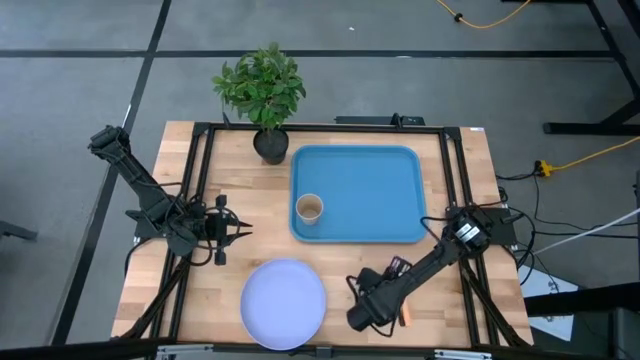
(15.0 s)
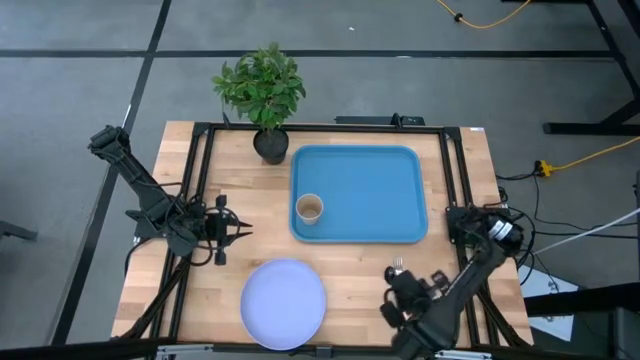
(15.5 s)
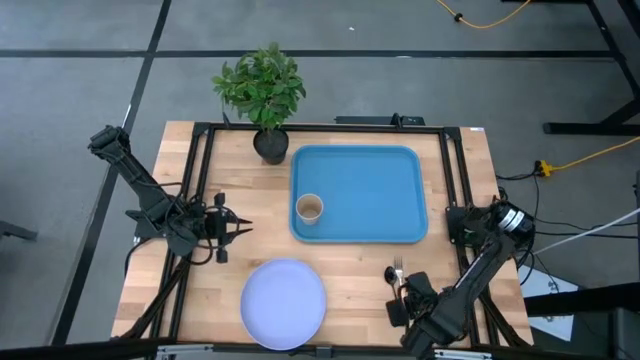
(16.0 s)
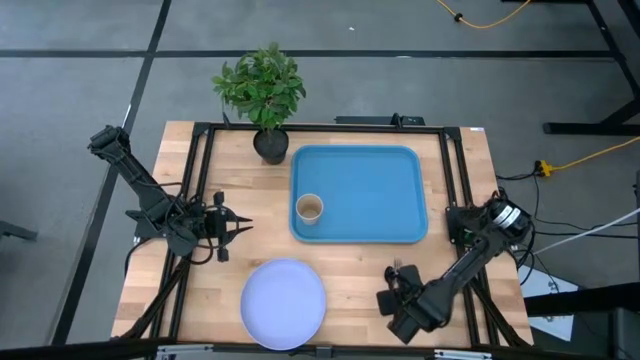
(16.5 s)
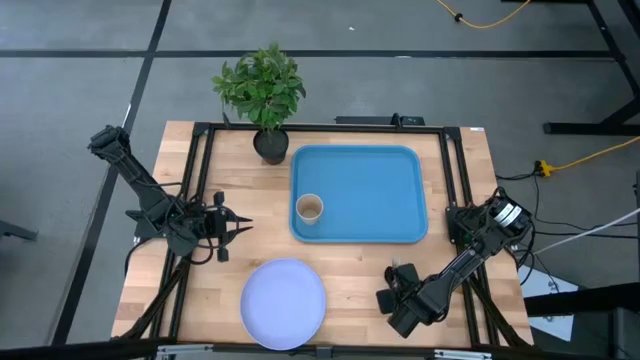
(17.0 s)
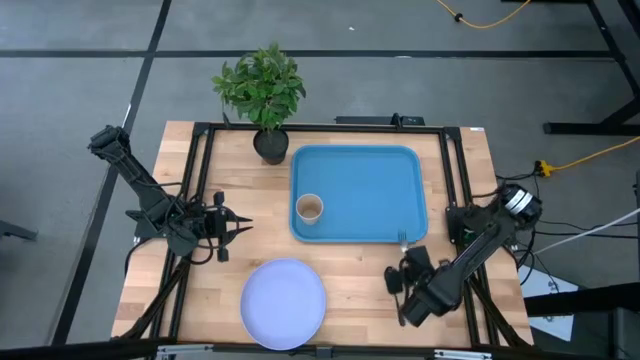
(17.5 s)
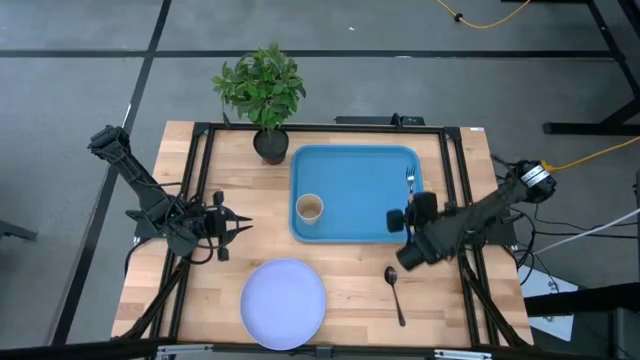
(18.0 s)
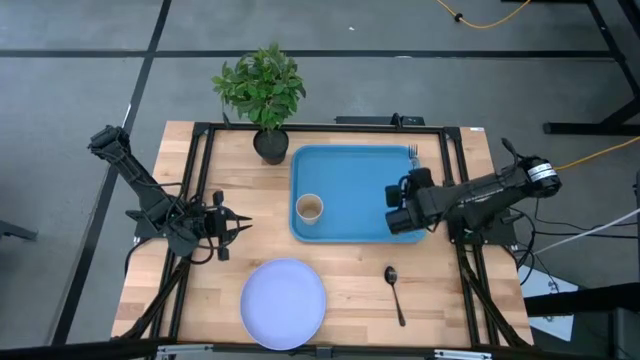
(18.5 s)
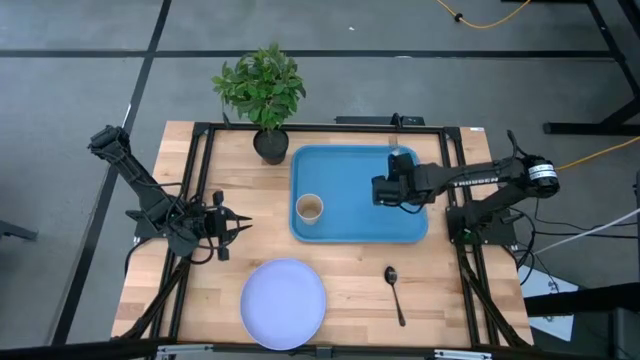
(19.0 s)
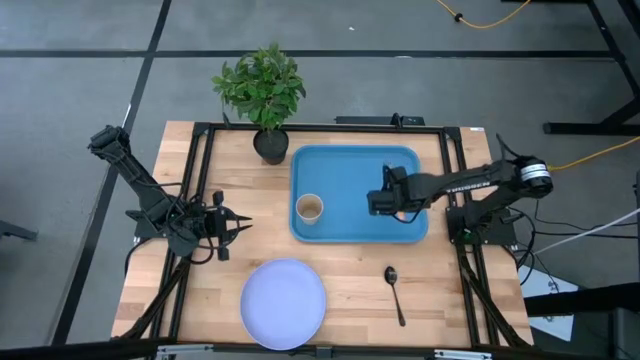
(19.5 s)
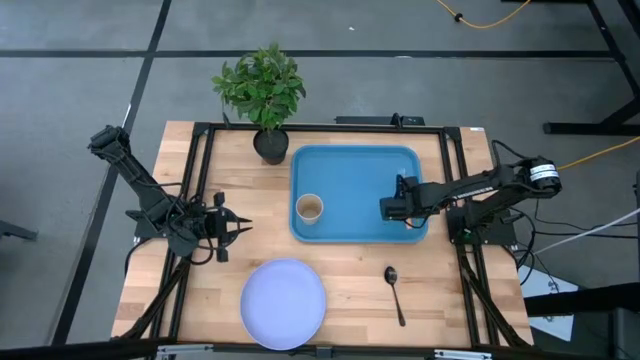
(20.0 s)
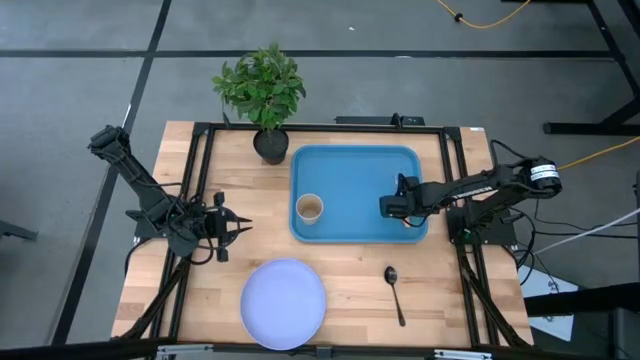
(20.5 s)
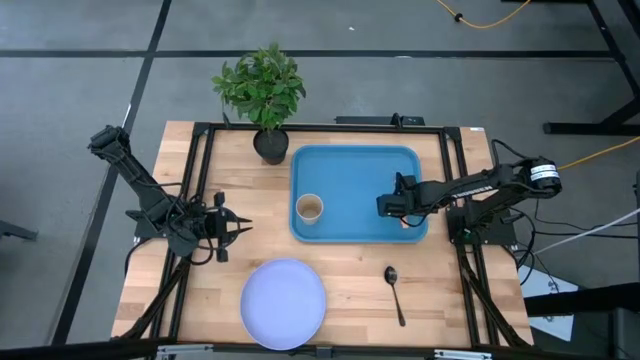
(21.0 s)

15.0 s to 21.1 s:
Task: Pick and place plate/cup/fork/spoon on tray
Put the fork on the right side of the tray

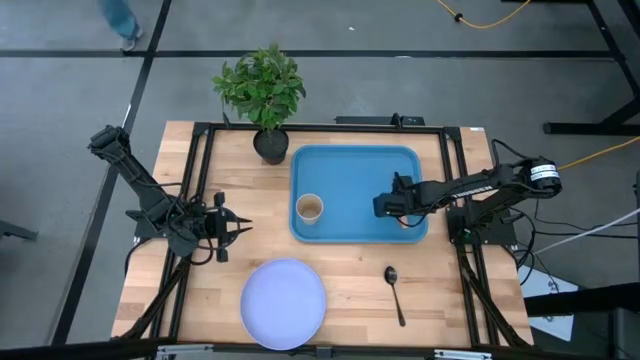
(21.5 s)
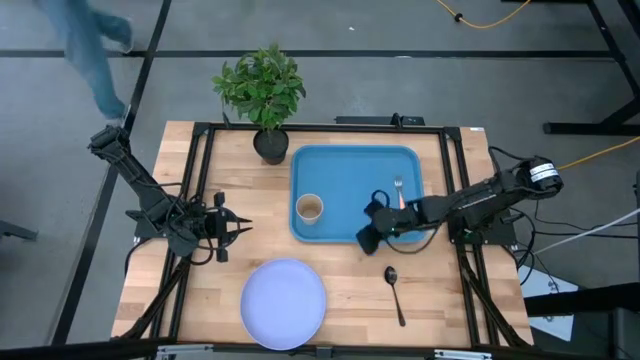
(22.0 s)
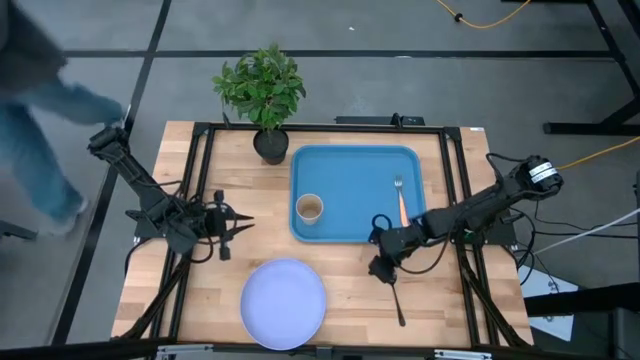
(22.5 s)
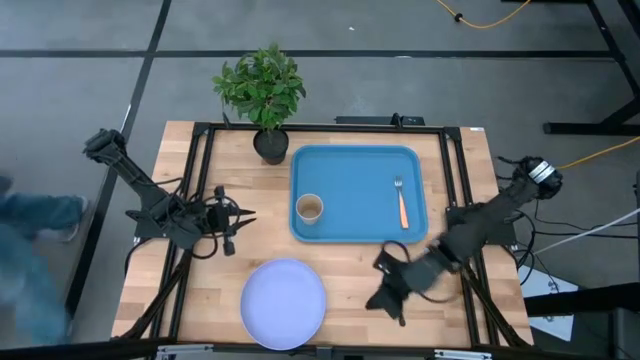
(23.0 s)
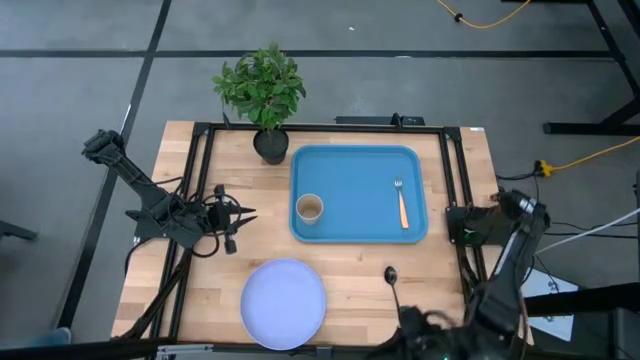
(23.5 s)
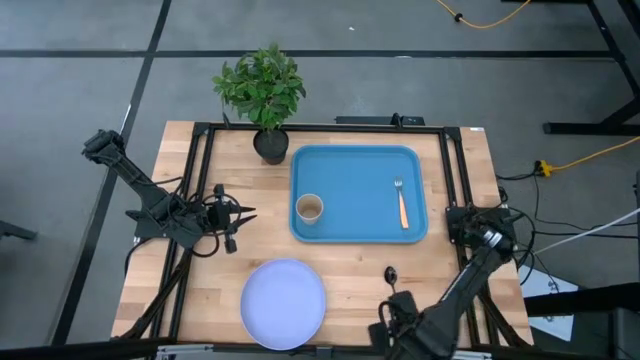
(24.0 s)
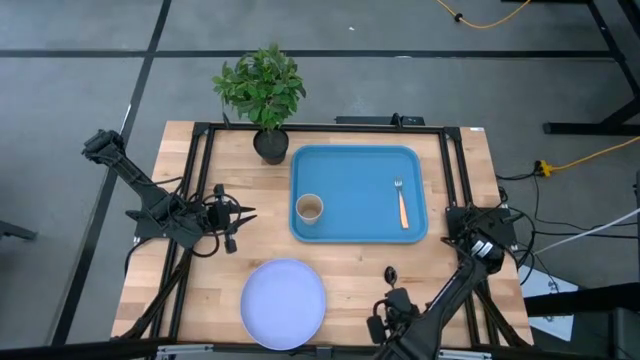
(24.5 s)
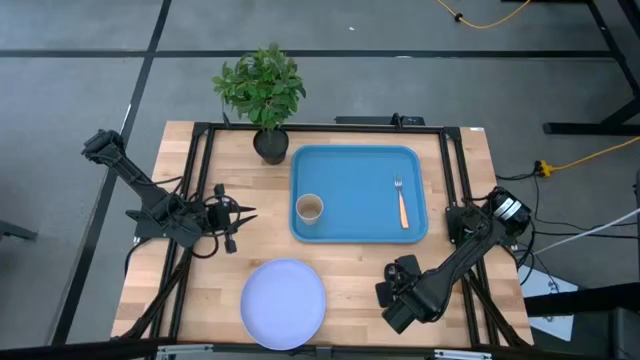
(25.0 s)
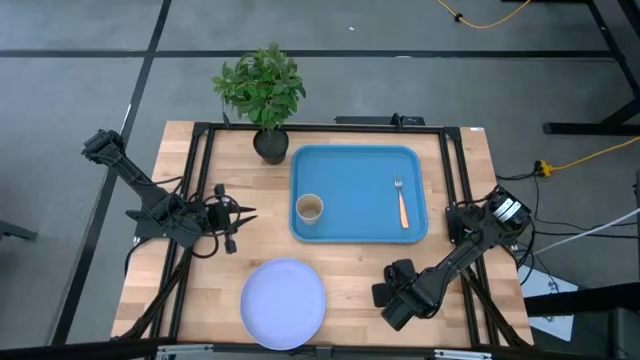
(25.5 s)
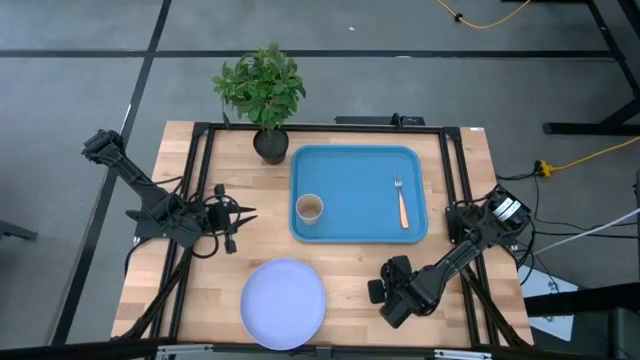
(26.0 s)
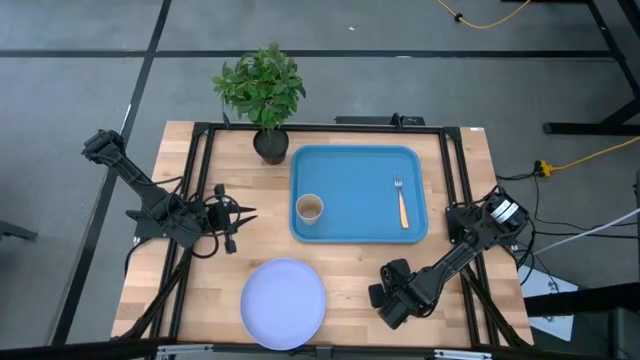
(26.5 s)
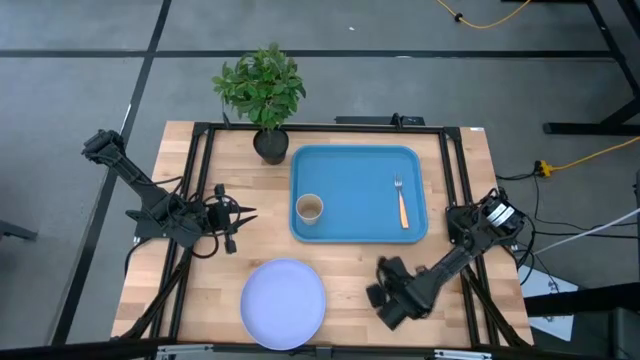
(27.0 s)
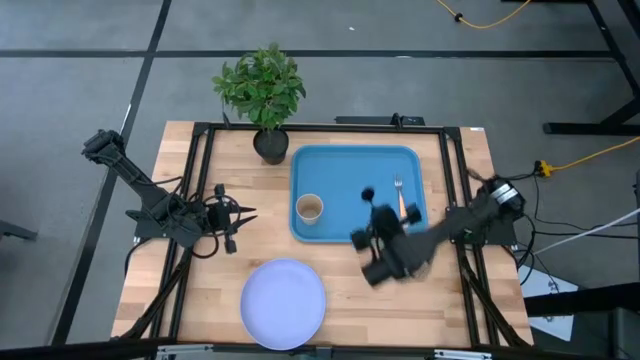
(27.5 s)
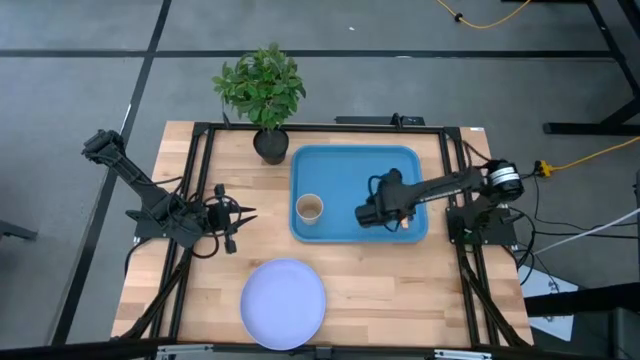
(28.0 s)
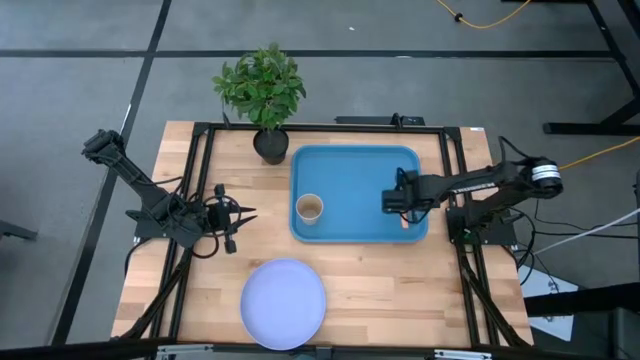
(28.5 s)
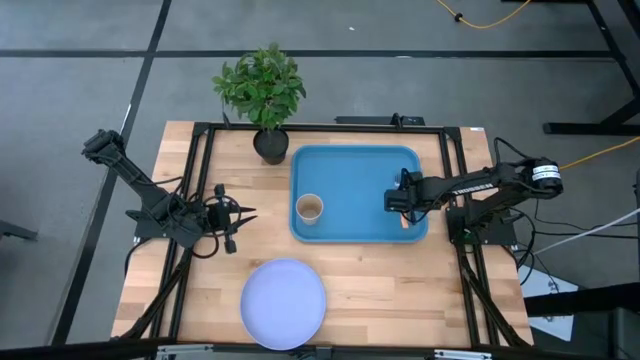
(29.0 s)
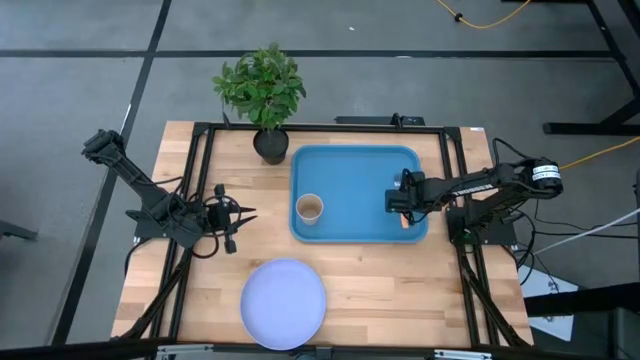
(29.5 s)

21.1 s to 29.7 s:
Put the spoon to the right side of the fork

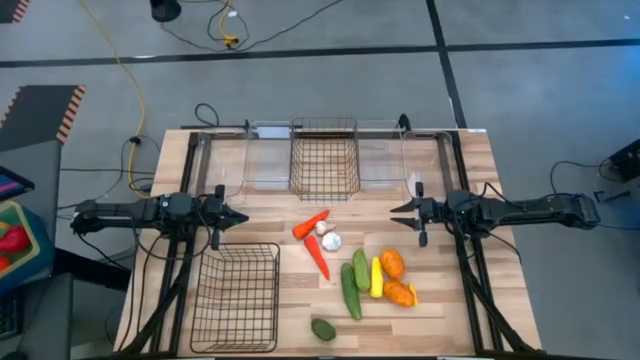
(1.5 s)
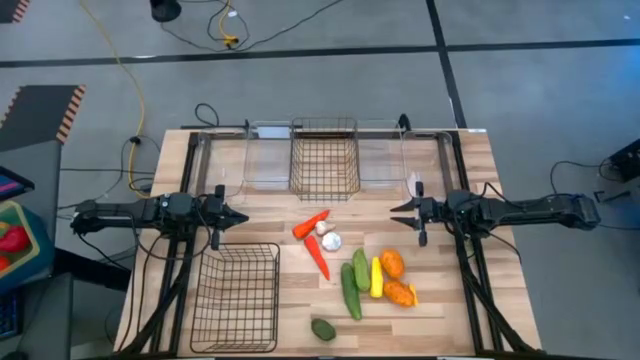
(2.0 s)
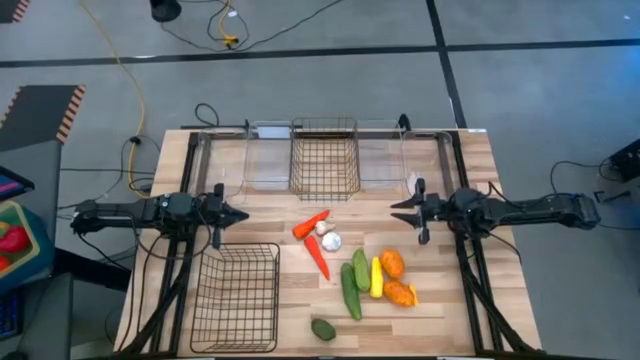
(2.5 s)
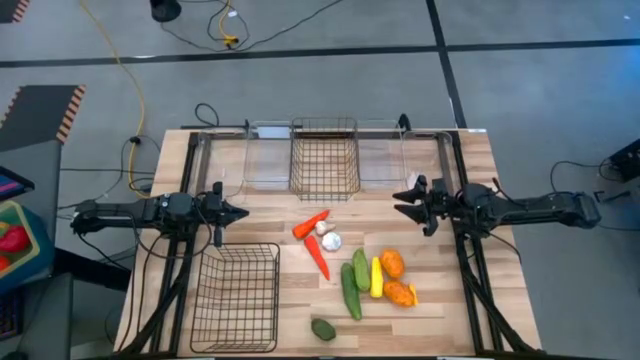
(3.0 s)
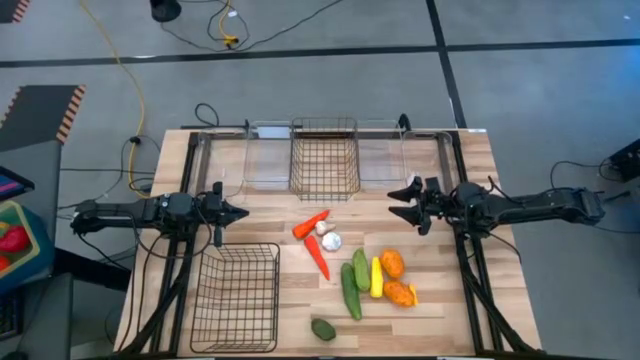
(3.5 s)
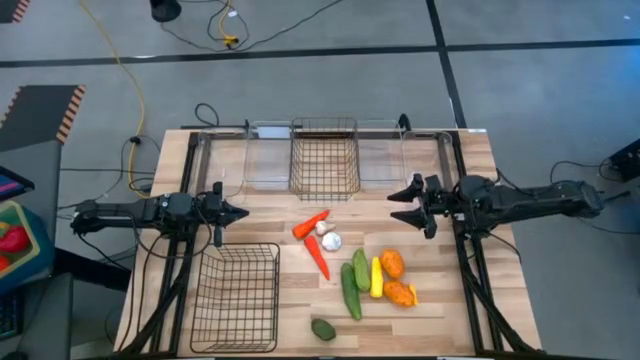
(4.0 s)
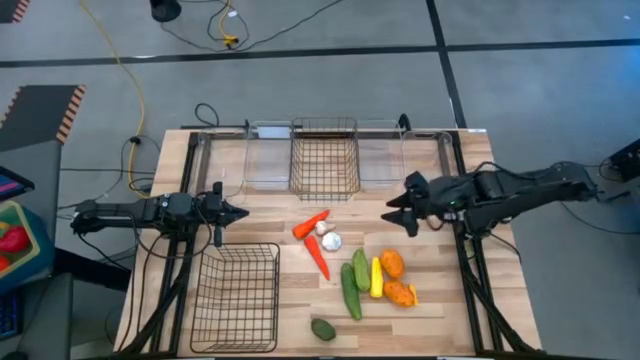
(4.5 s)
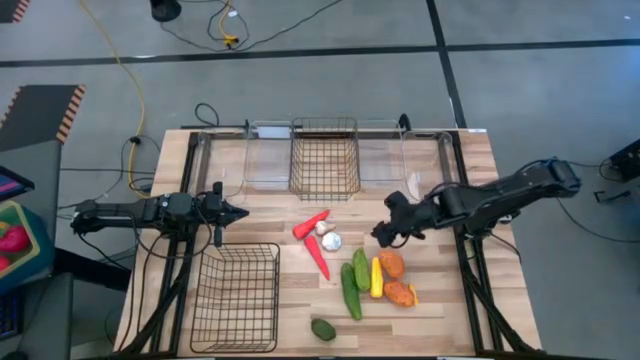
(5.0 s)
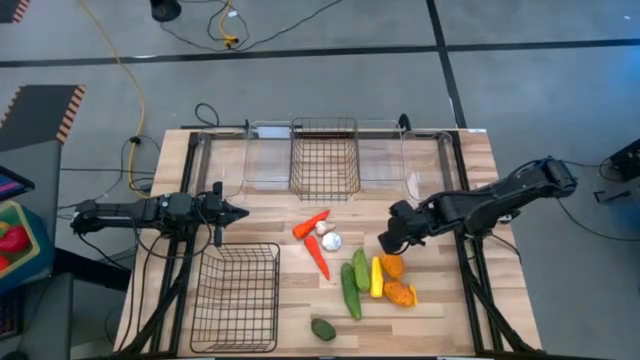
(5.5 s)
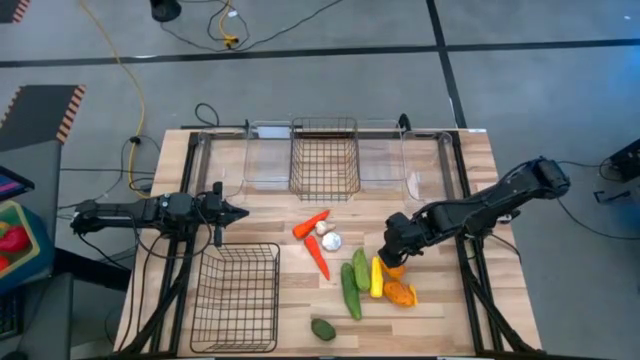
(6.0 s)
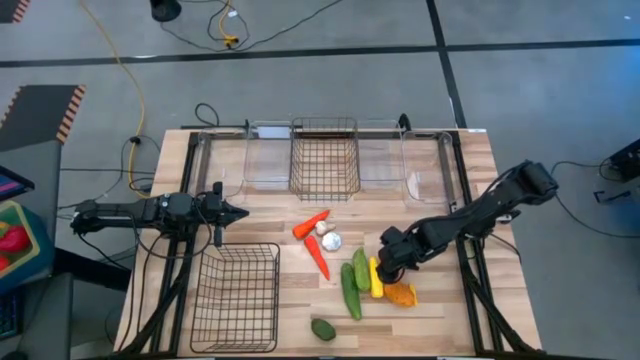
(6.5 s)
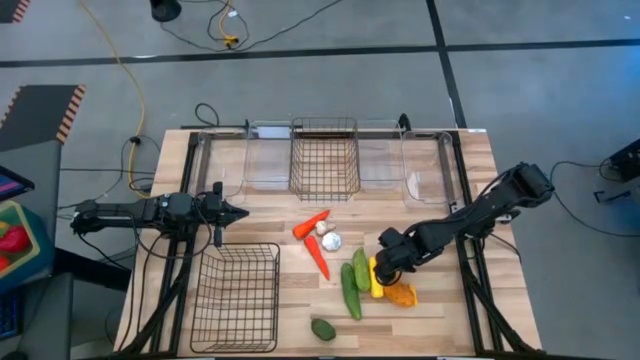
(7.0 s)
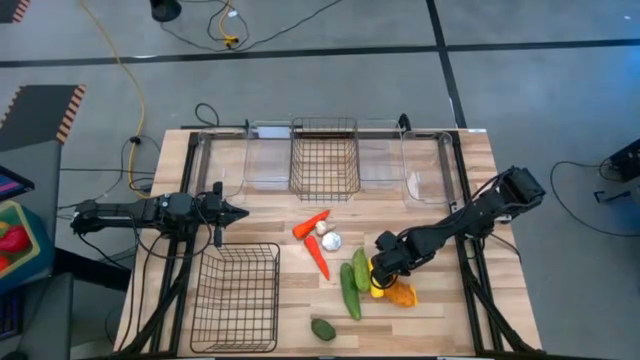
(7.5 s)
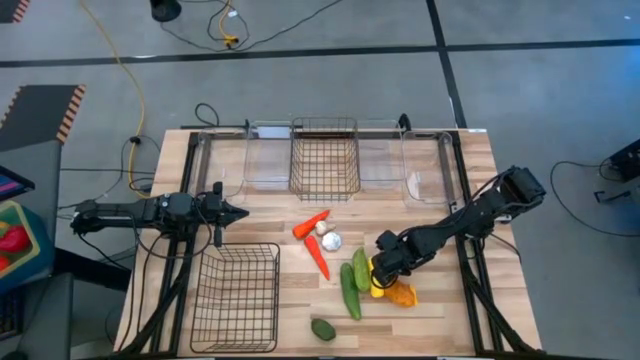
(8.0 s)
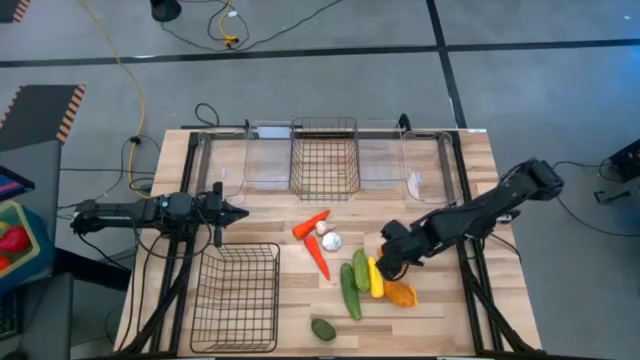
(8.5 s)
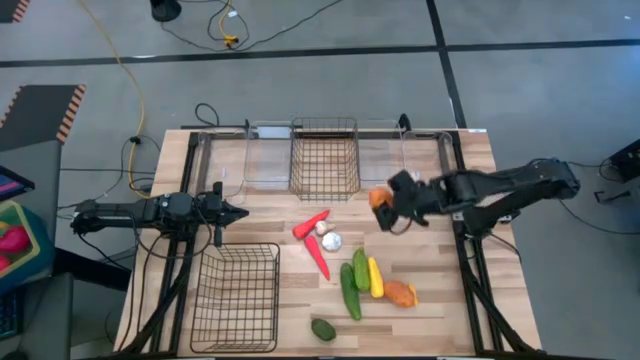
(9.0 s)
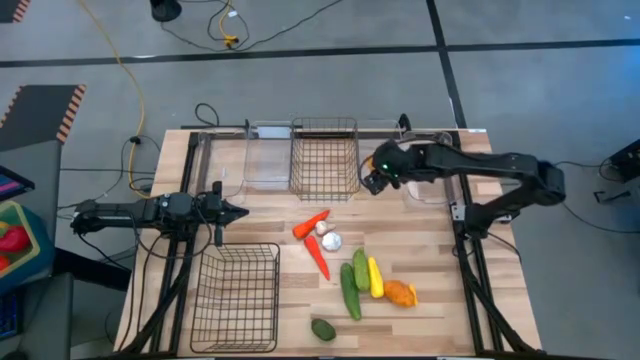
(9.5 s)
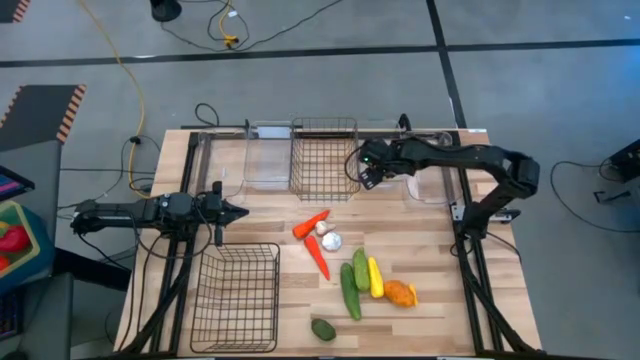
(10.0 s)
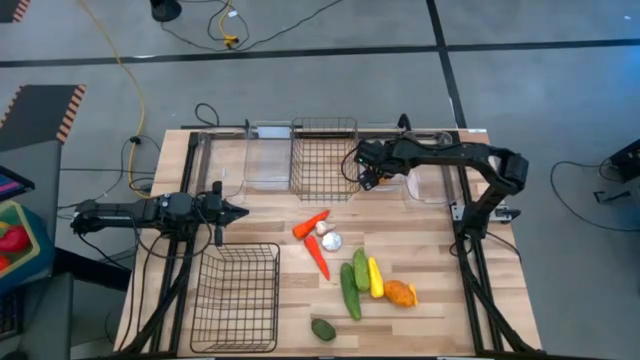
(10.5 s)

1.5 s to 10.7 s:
Task: Sort produce into baskets
Put the top yellow mango into the middle right transparent bin
